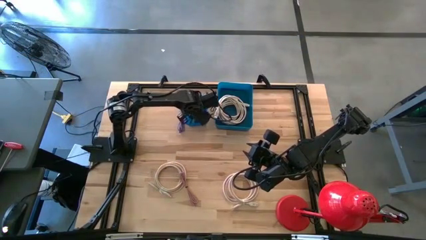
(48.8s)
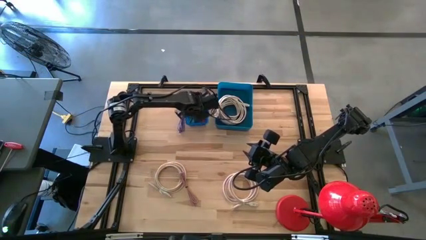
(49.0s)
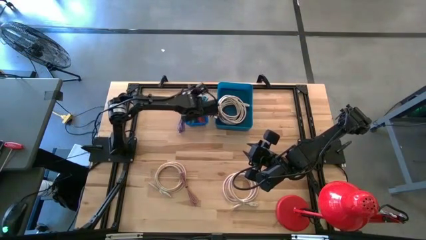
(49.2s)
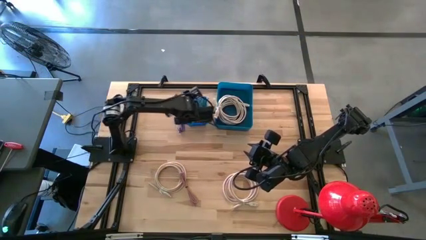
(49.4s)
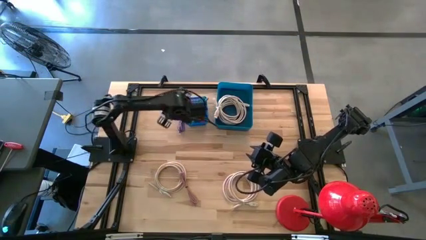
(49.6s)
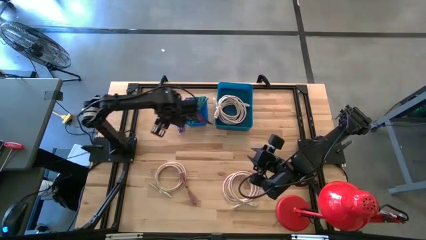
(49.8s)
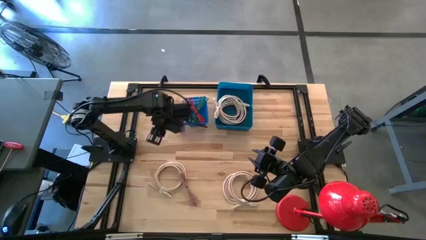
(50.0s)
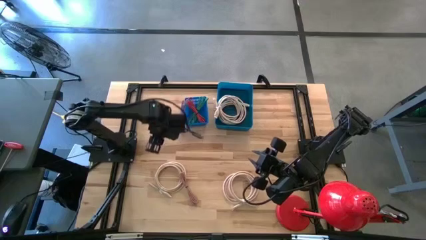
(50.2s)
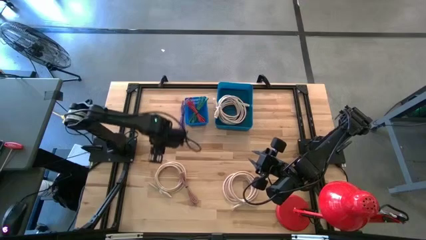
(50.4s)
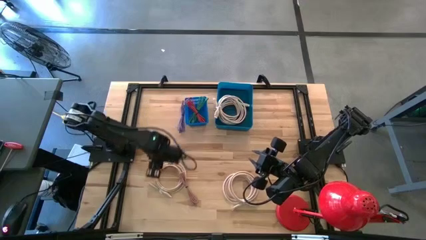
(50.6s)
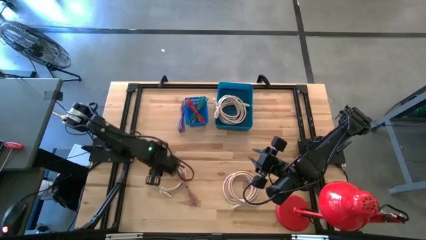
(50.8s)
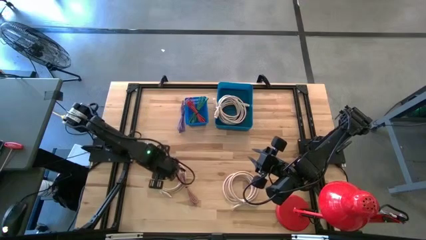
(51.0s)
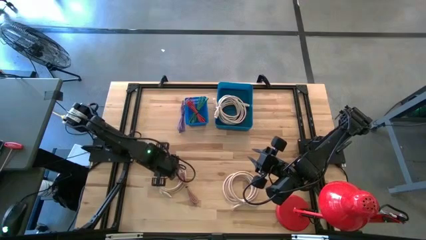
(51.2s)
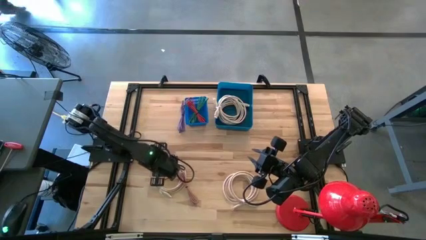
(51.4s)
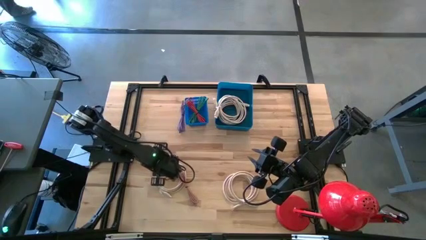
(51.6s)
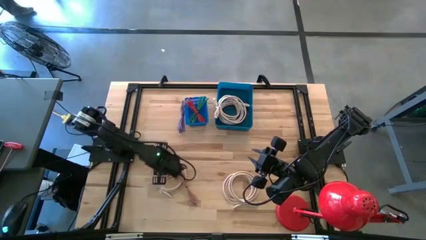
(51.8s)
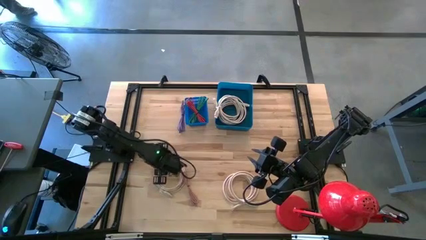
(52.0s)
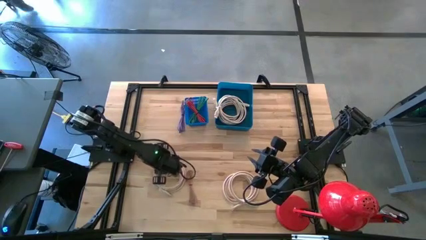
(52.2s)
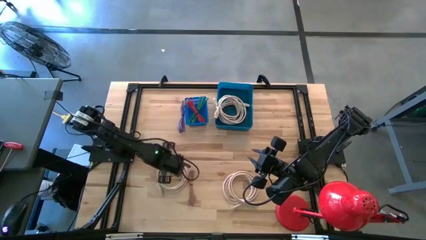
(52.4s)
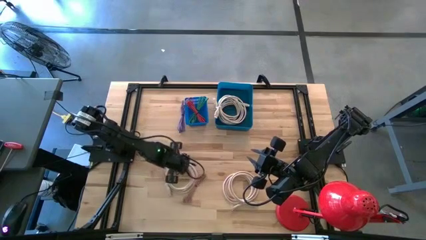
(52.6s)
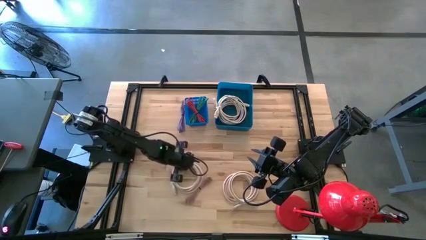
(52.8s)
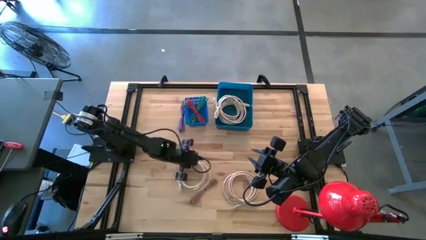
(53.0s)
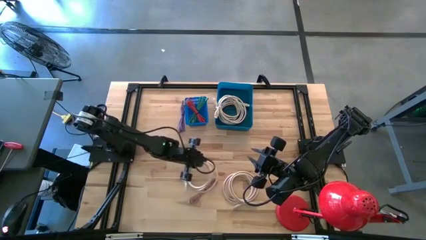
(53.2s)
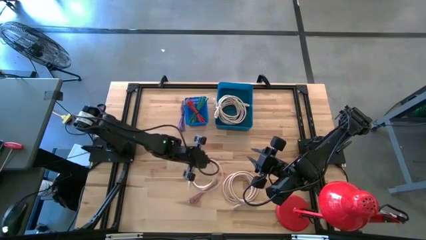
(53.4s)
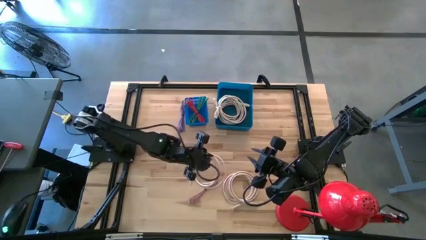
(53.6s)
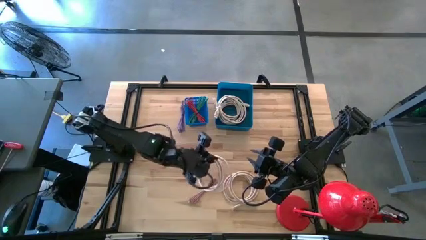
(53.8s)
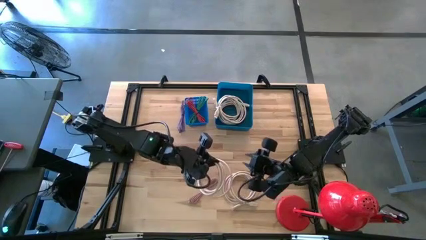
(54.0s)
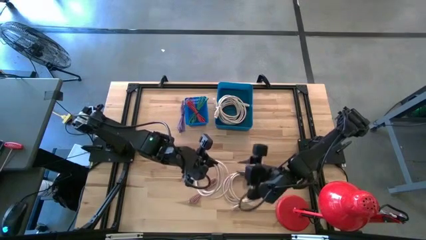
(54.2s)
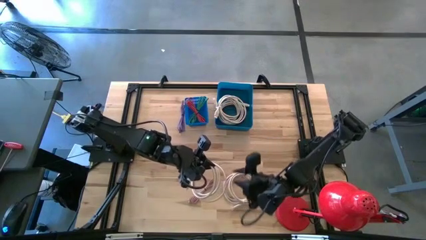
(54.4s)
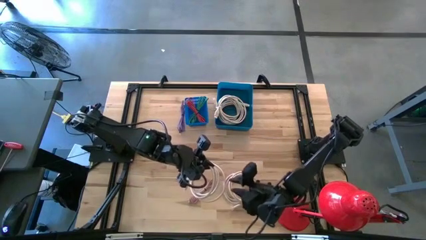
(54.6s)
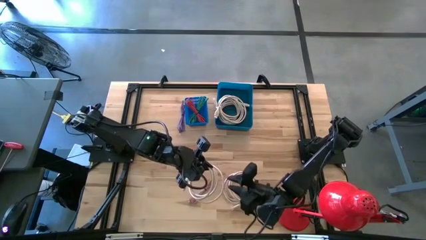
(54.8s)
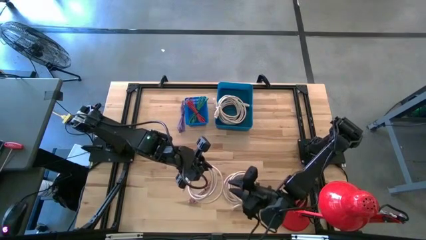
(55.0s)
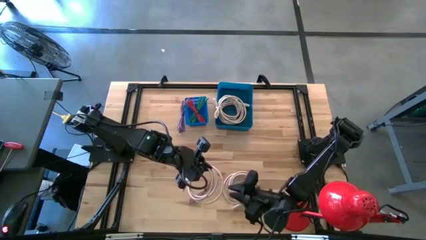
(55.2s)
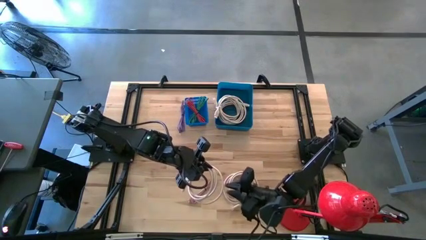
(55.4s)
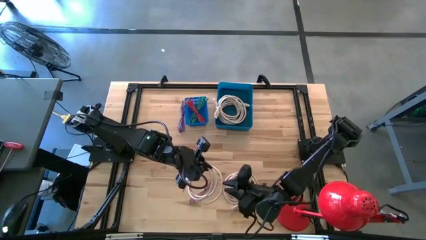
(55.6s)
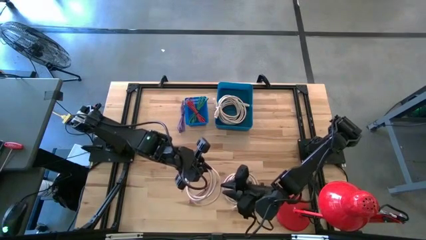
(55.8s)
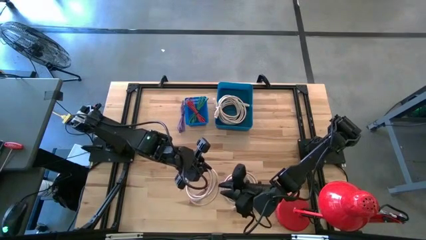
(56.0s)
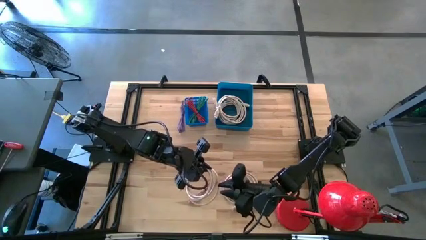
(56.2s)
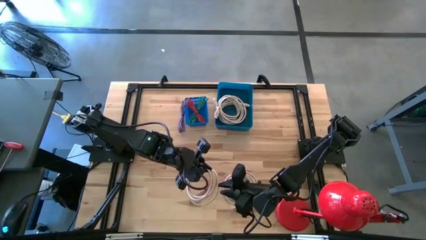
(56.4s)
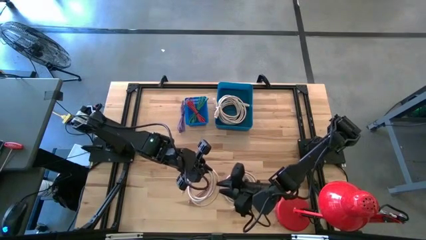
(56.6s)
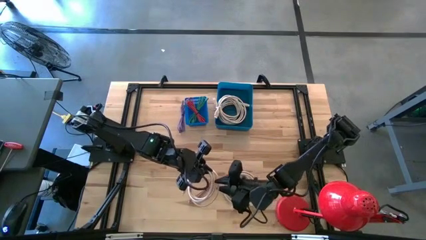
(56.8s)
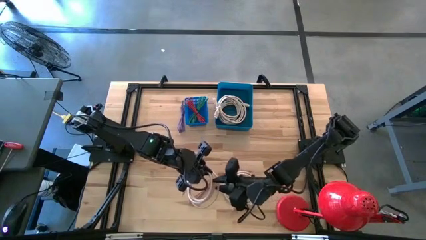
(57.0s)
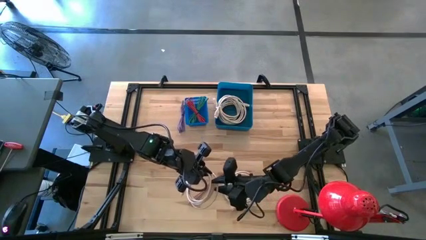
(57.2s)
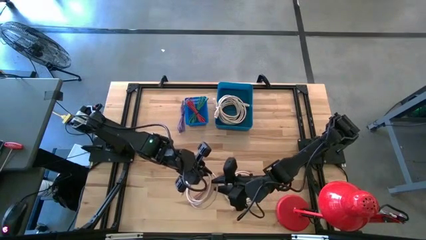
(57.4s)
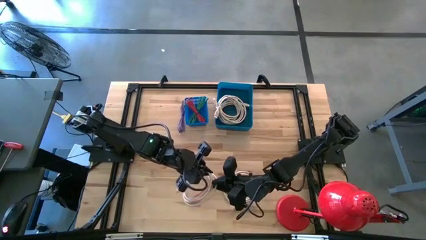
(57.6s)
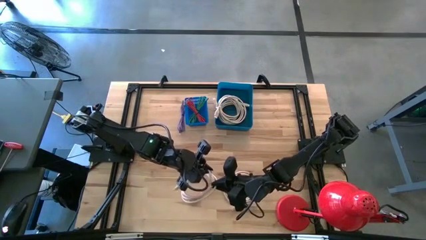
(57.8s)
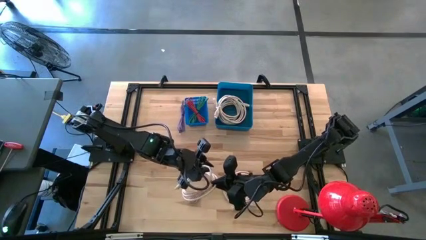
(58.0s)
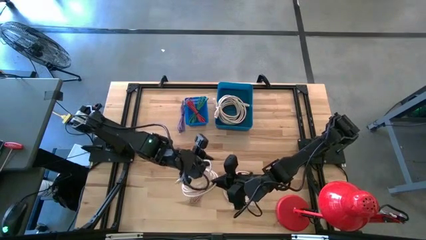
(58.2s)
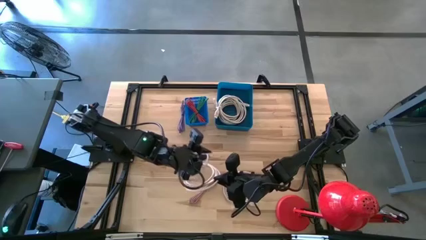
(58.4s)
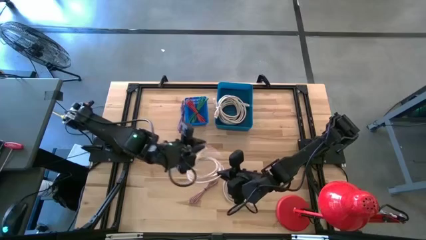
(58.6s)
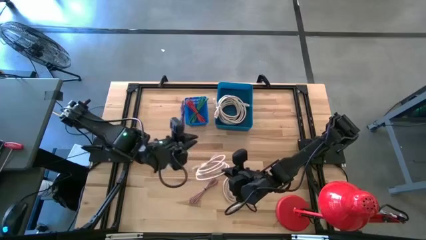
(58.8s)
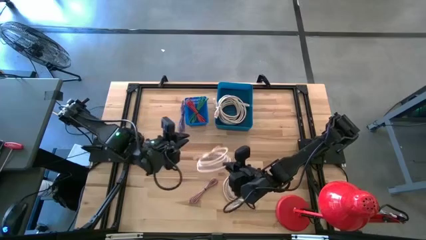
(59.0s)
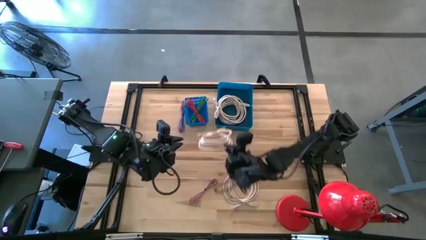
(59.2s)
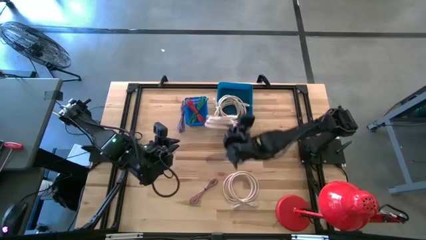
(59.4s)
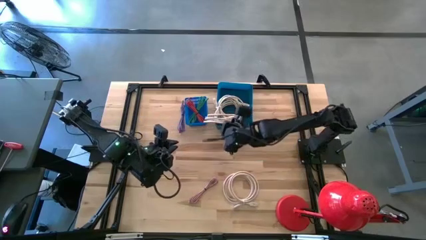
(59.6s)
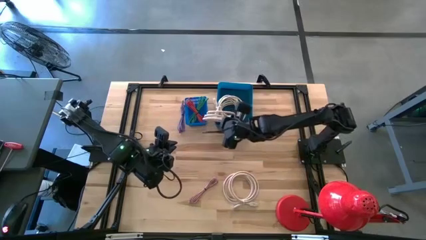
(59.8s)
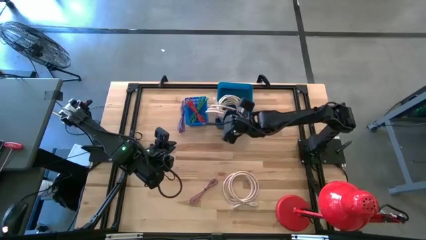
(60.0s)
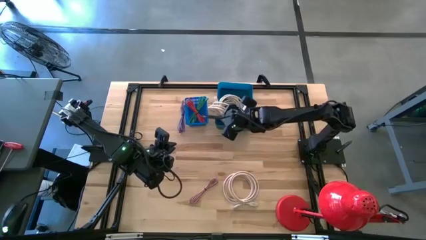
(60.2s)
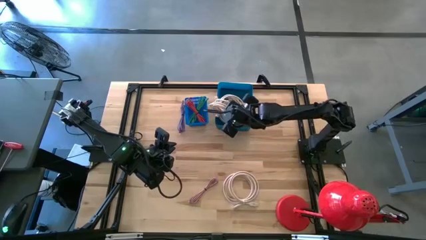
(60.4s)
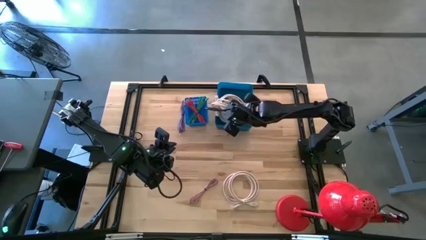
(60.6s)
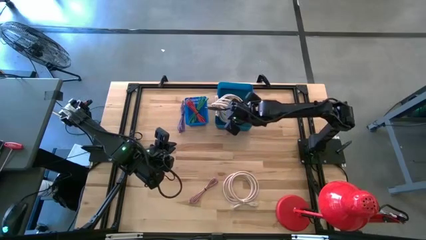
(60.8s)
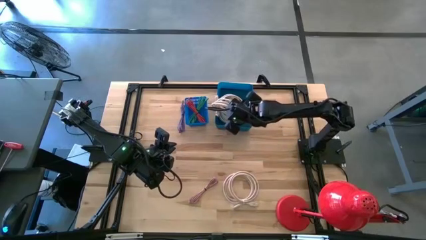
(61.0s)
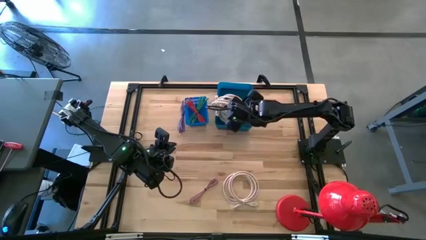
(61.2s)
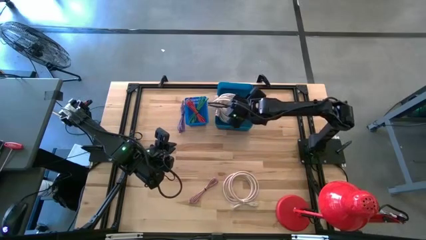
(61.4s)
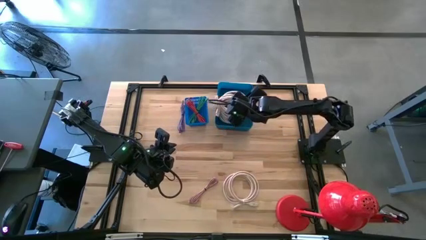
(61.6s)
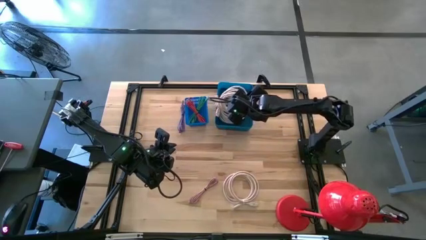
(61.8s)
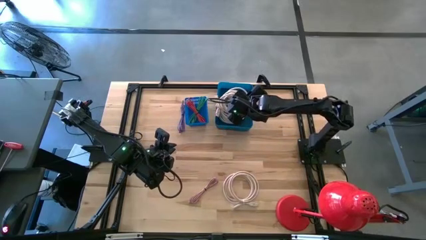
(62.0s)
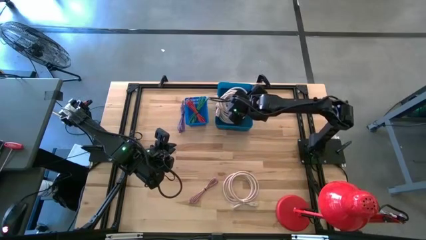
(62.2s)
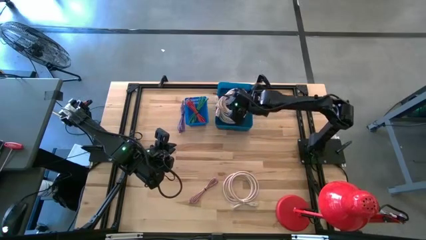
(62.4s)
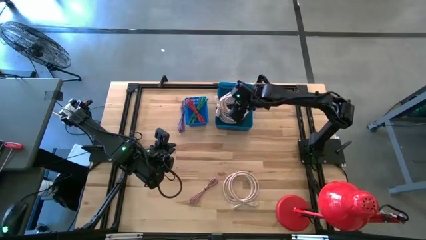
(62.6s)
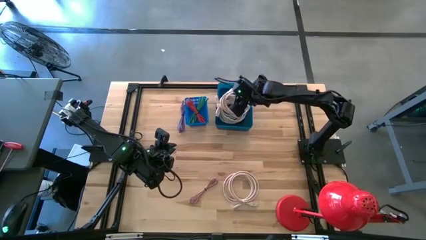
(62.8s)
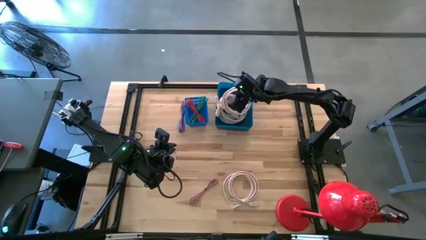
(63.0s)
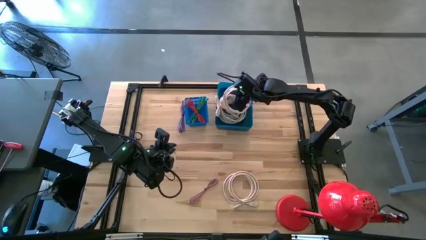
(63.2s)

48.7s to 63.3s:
Task: Pick & Place USB Port
Put the white HDMI cable into the dark blue bin
